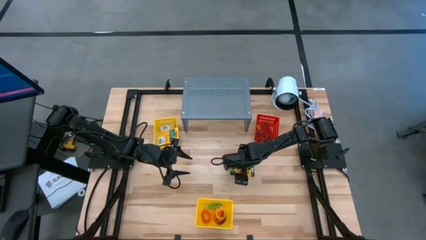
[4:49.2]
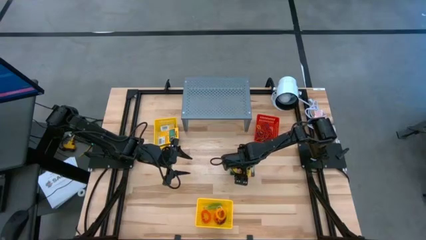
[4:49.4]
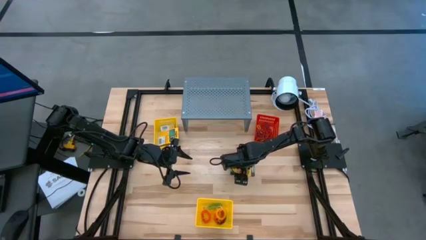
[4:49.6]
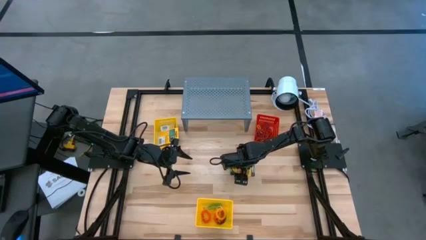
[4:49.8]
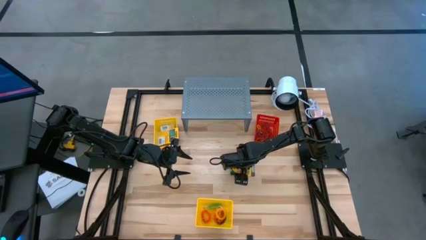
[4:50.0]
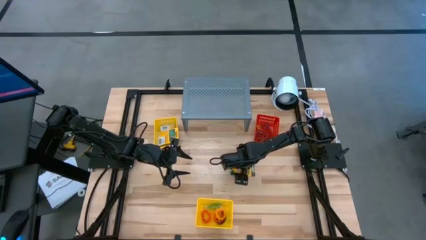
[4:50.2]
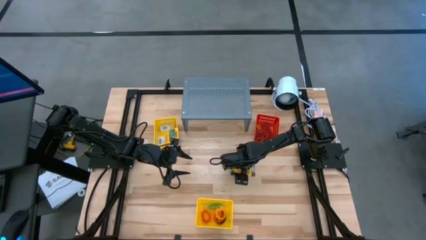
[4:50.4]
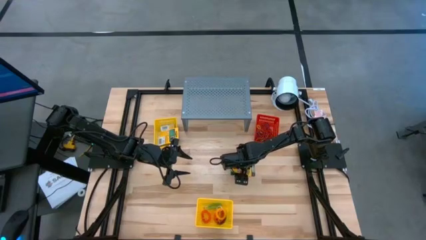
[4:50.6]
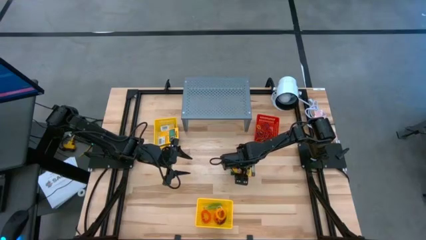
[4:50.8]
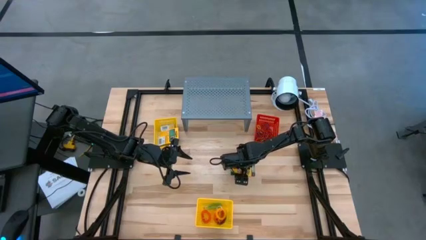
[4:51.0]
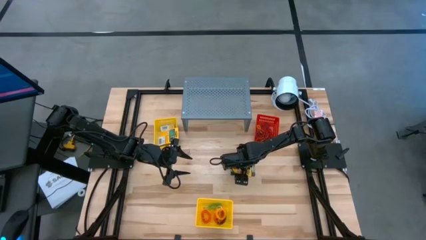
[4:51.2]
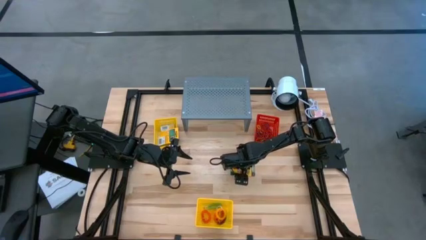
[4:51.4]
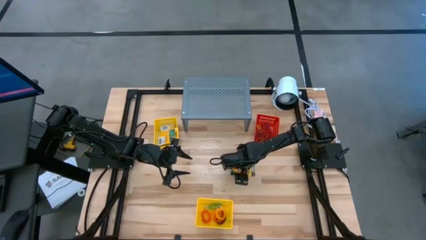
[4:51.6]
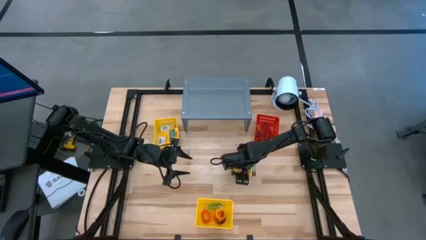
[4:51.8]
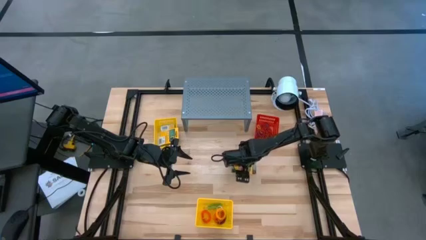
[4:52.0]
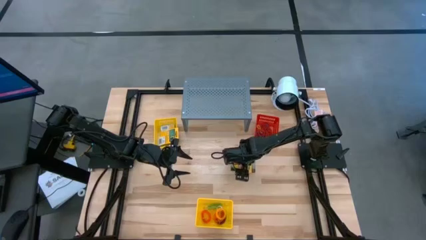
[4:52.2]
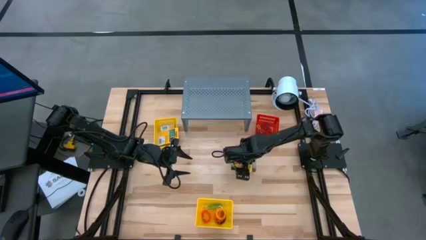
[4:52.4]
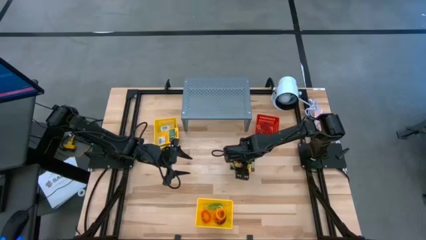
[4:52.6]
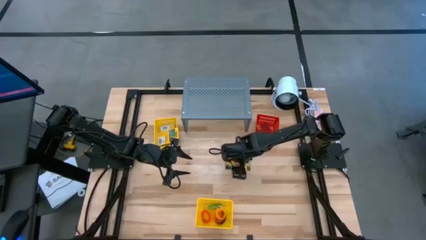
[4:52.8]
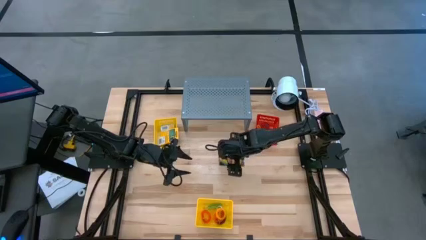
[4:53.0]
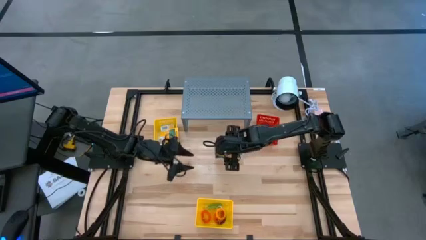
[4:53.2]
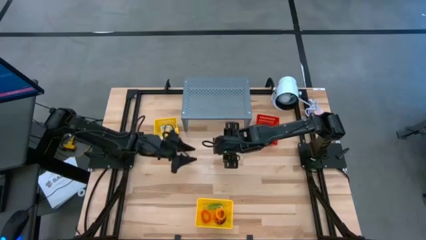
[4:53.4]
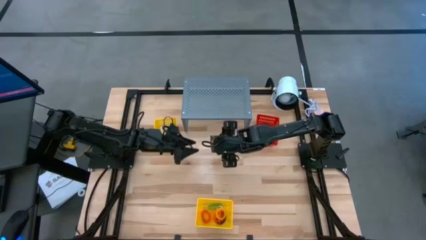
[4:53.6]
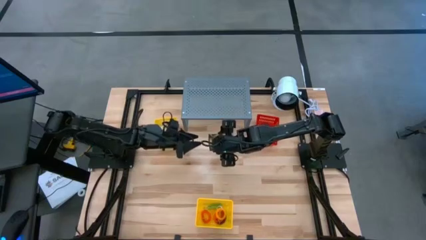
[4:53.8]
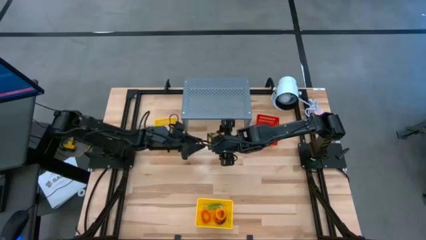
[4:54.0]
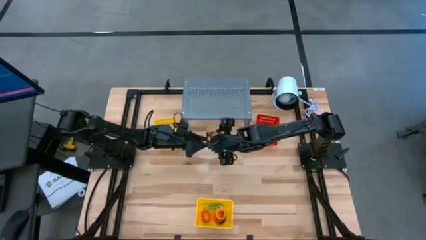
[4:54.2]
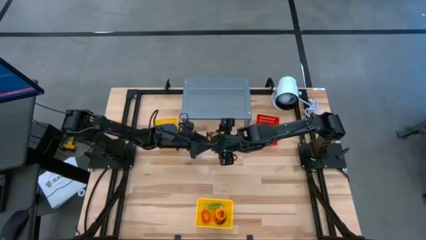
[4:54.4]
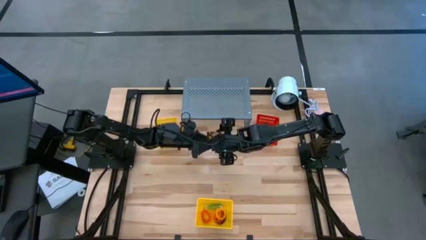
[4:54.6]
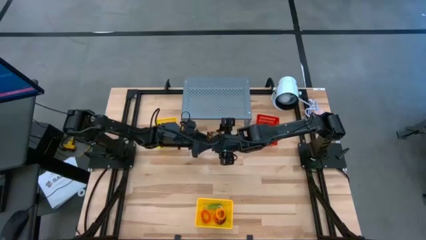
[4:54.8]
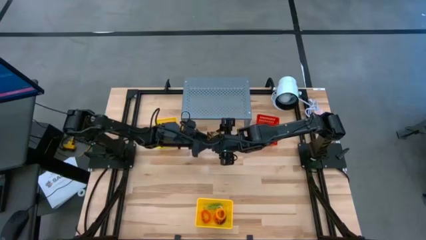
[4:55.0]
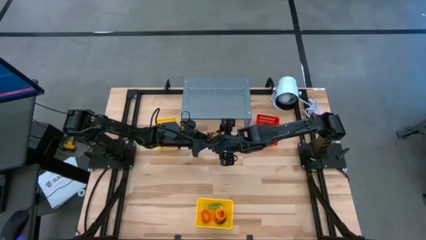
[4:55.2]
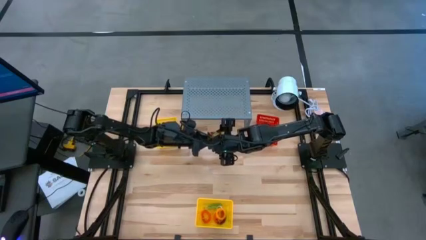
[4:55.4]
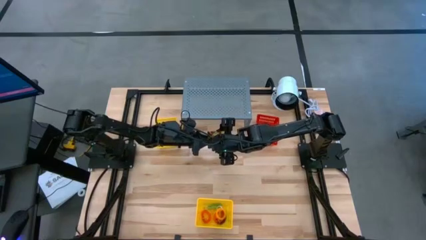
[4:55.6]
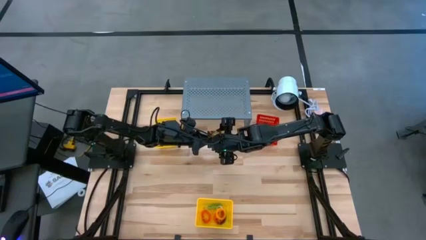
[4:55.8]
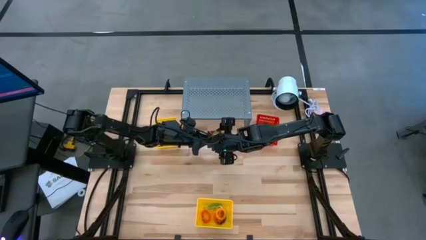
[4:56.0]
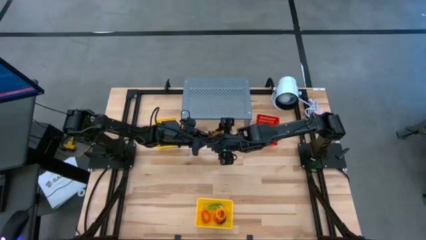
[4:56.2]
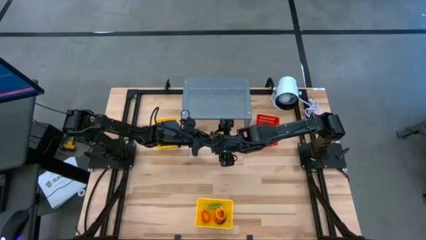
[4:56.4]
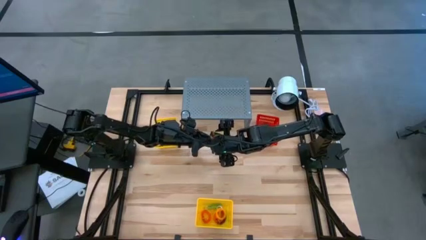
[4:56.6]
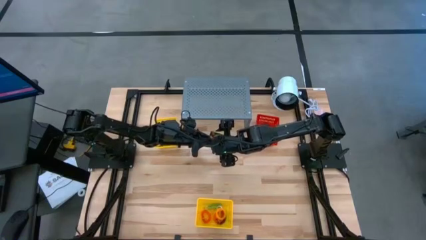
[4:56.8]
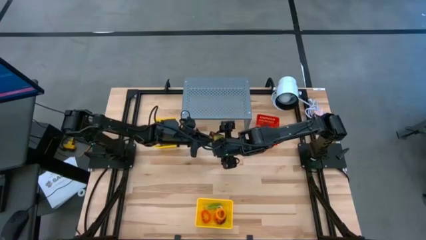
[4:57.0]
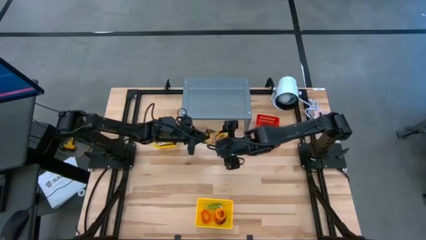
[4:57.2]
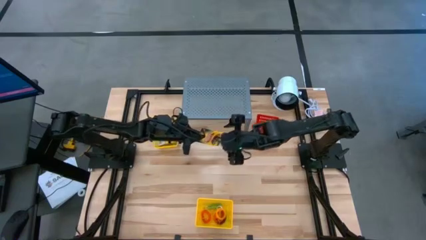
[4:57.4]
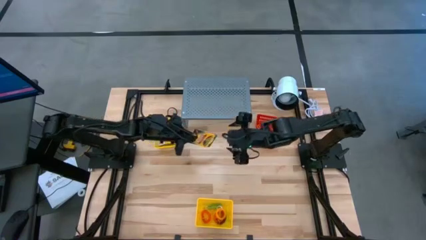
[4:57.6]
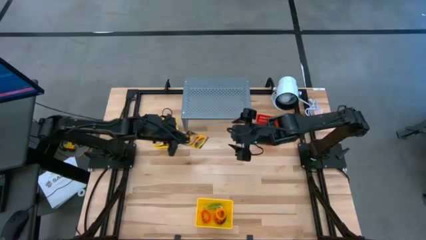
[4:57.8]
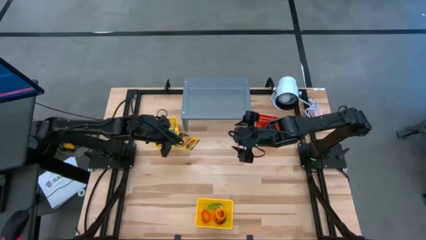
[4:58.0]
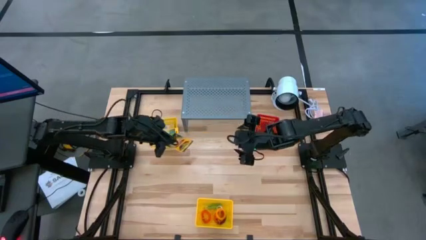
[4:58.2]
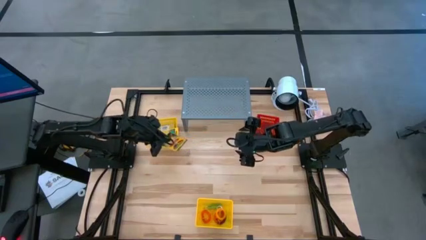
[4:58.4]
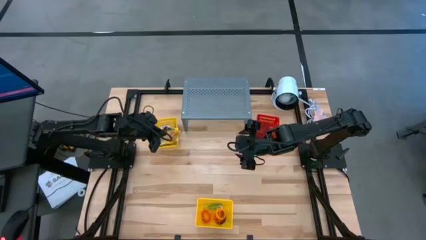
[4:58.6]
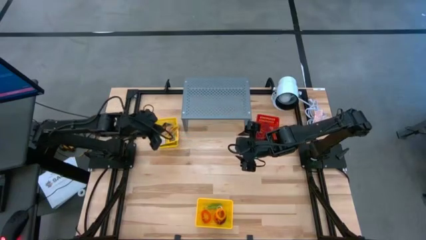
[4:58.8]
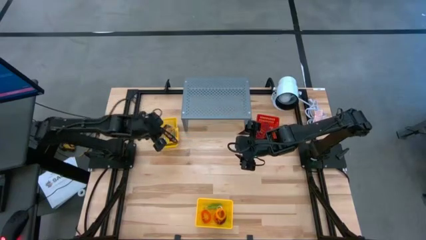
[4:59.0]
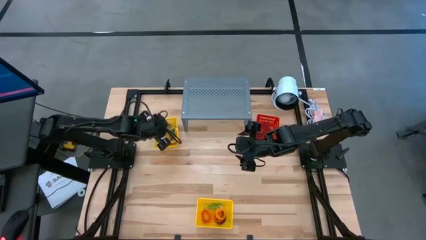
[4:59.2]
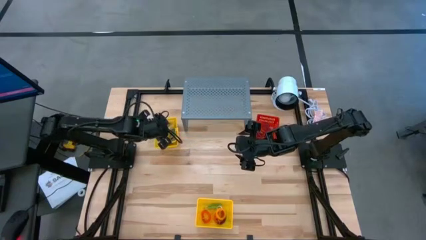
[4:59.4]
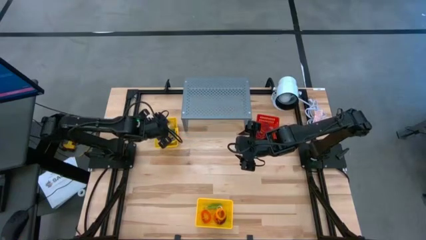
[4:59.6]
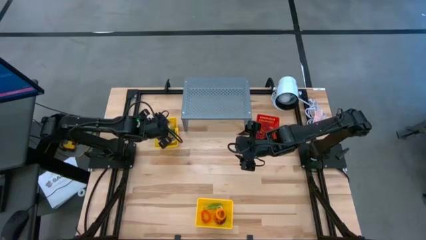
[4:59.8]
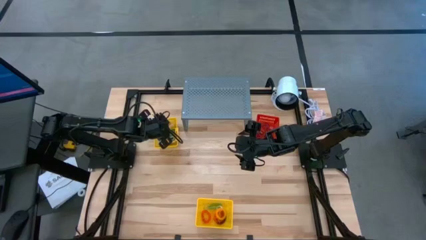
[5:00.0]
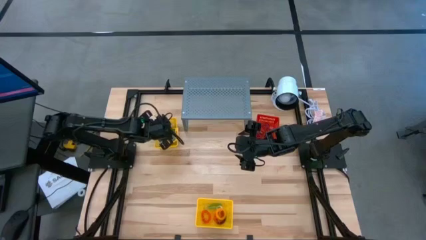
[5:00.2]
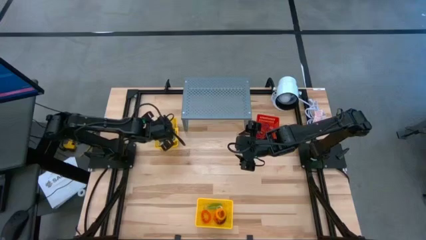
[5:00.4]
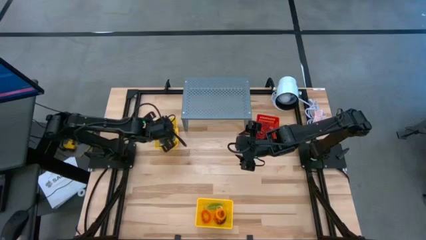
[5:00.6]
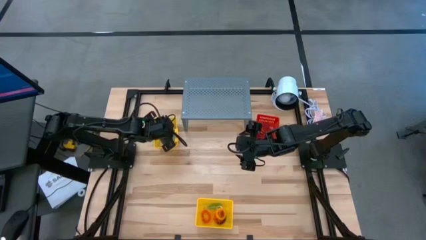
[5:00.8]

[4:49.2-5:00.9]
Task: Pick & Place Office Desk Supplies
Put the yellow crayon box into the top yellow bin
